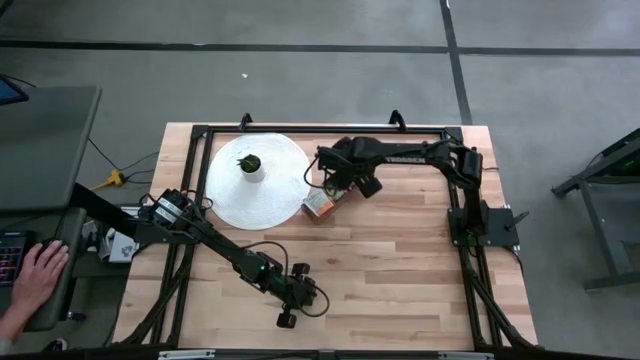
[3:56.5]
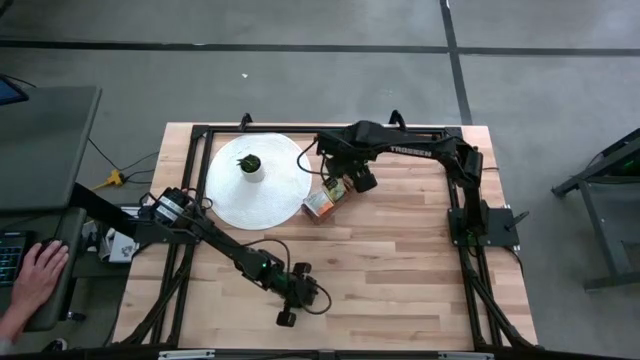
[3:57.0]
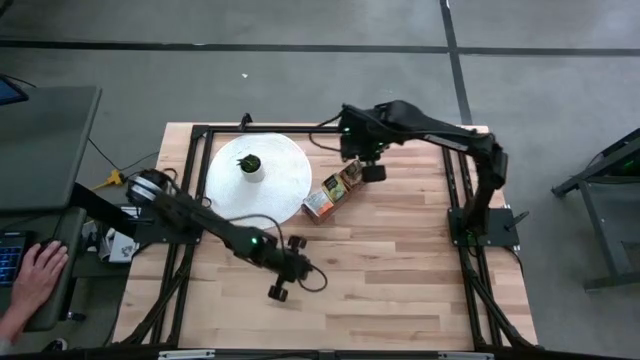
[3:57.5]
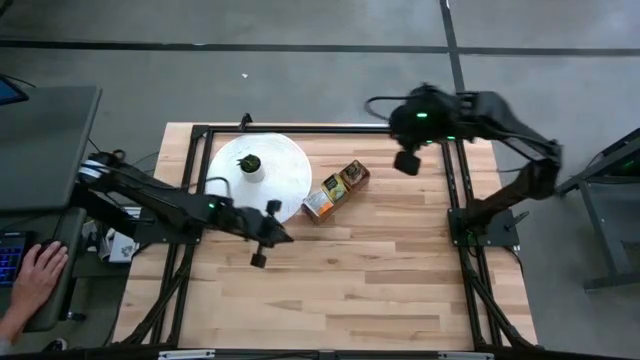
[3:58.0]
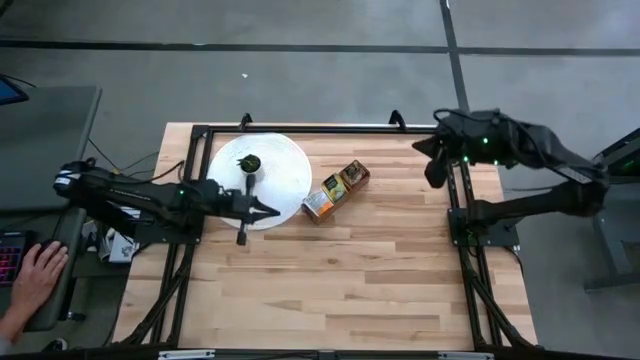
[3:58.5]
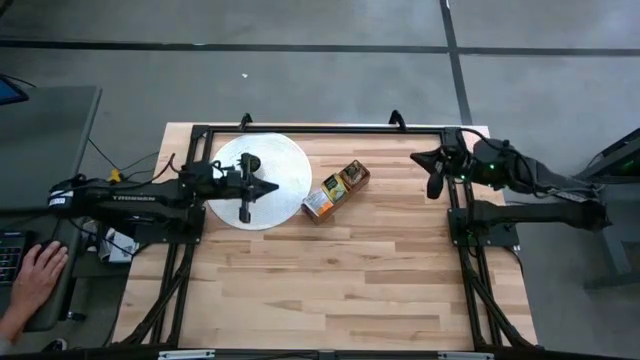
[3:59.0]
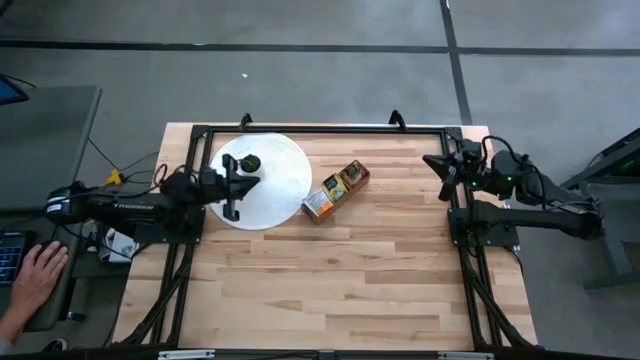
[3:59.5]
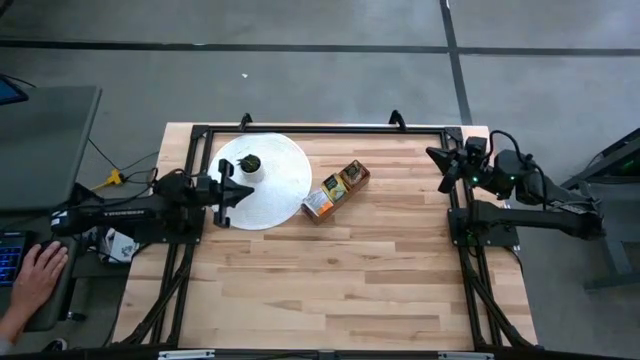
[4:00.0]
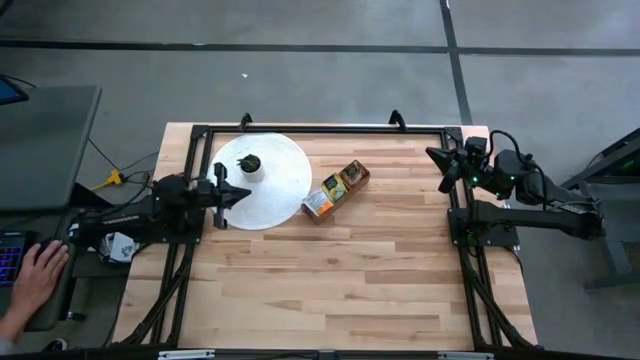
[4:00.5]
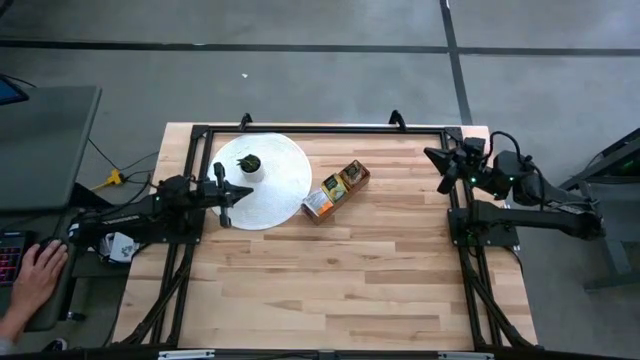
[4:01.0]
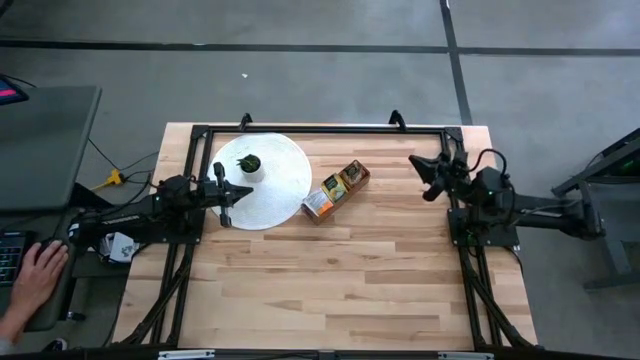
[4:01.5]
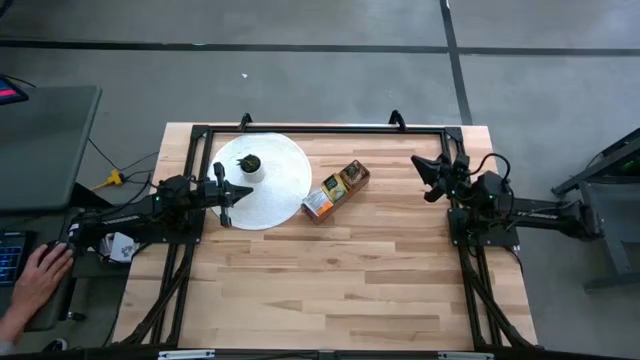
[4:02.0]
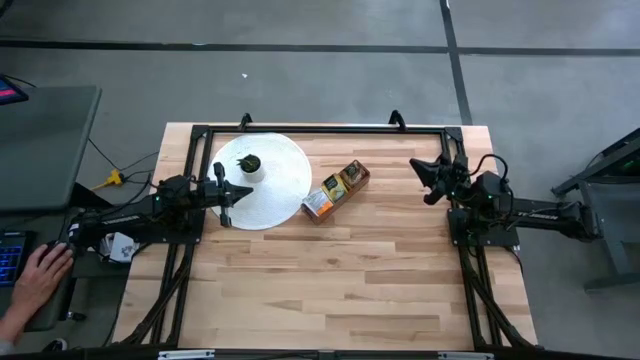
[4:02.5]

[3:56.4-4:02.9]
Task: Pick & Place Tea
Return to Home Position

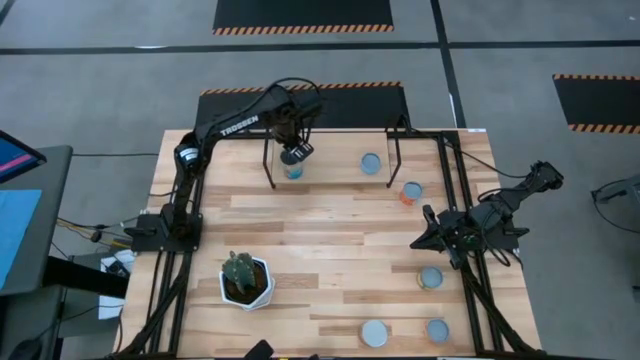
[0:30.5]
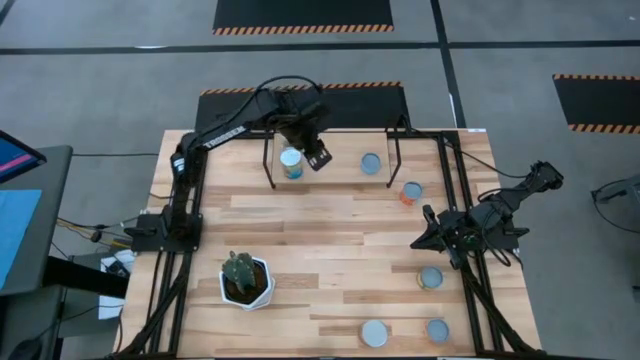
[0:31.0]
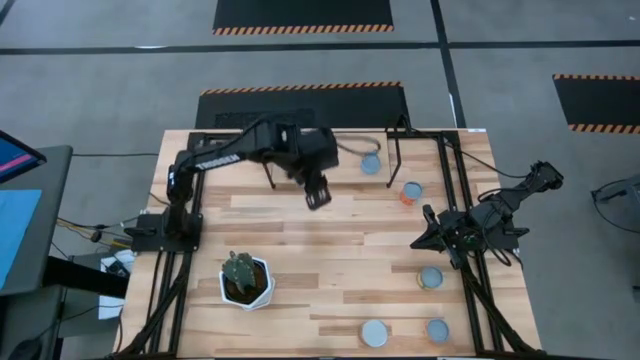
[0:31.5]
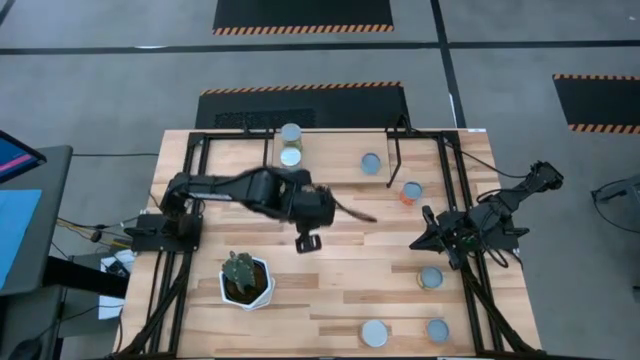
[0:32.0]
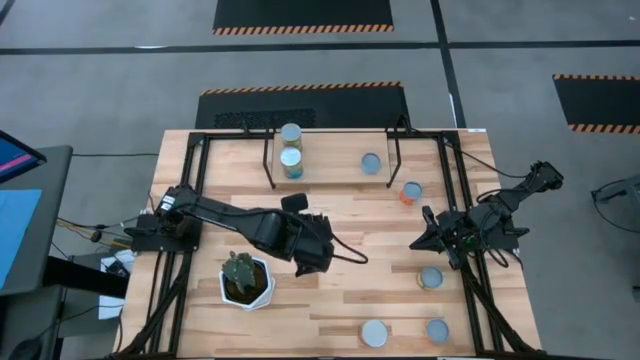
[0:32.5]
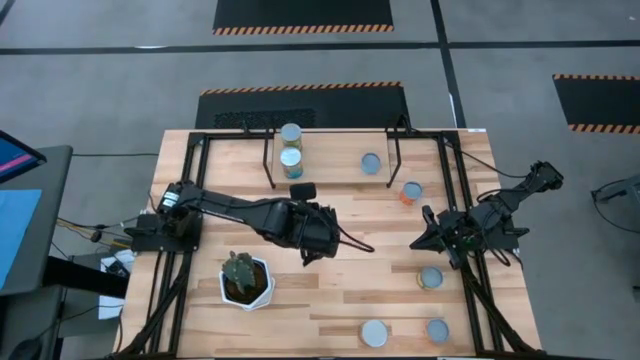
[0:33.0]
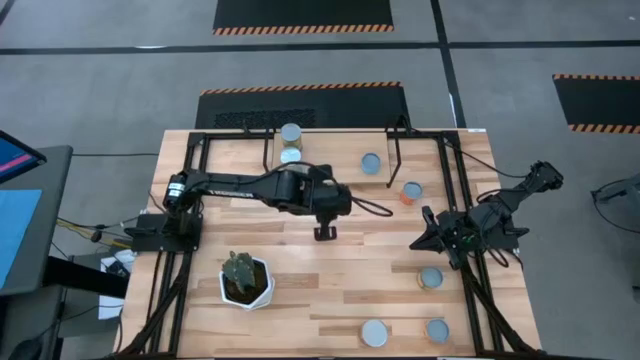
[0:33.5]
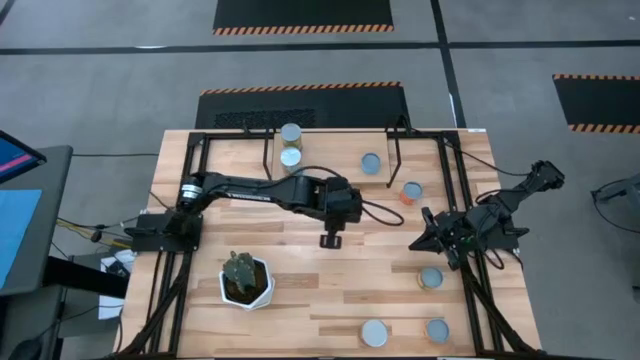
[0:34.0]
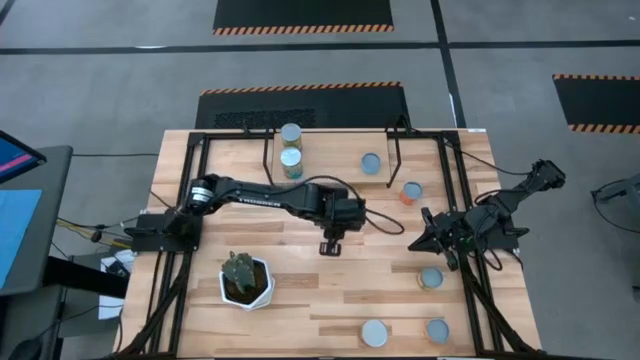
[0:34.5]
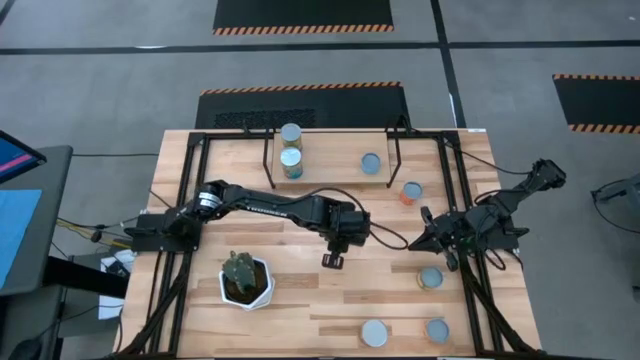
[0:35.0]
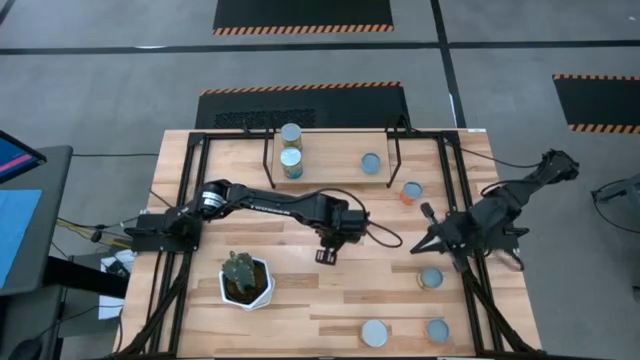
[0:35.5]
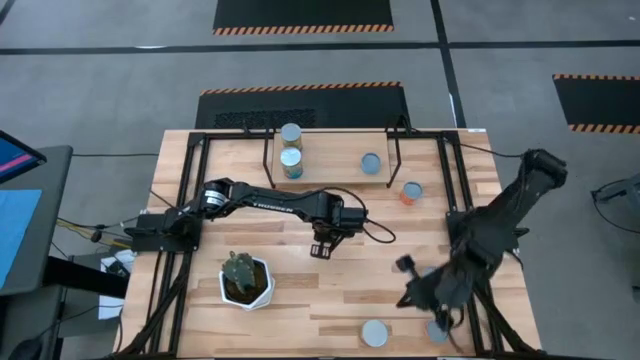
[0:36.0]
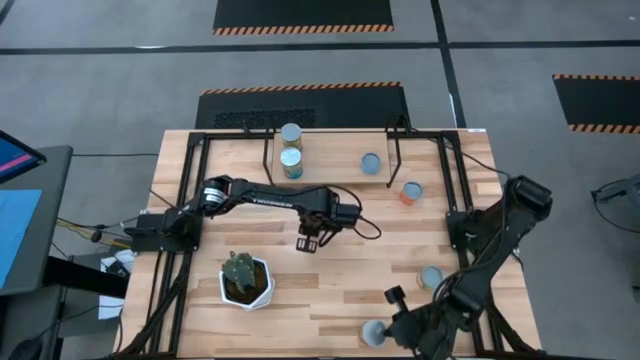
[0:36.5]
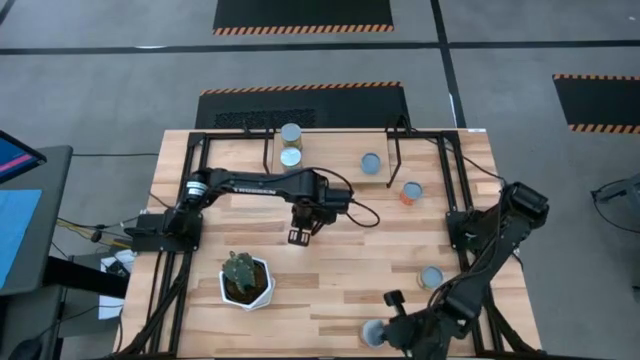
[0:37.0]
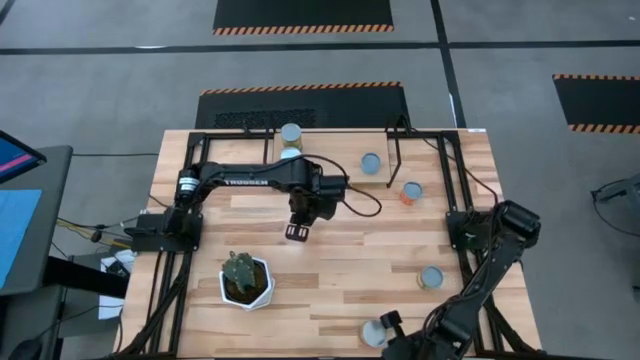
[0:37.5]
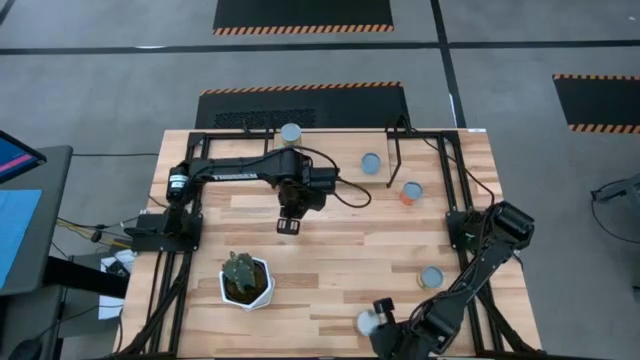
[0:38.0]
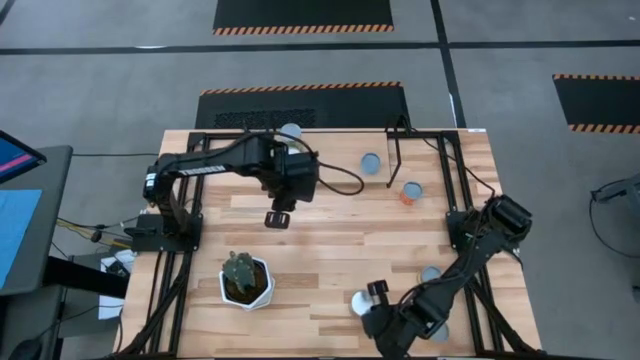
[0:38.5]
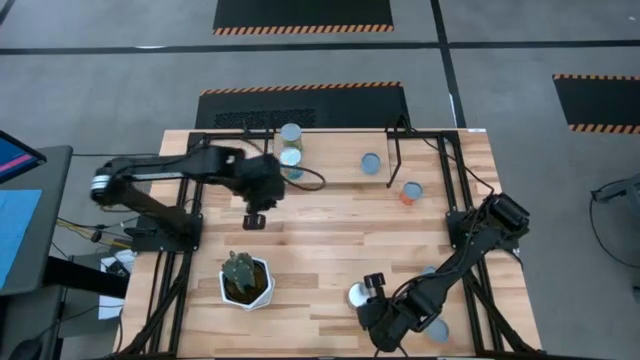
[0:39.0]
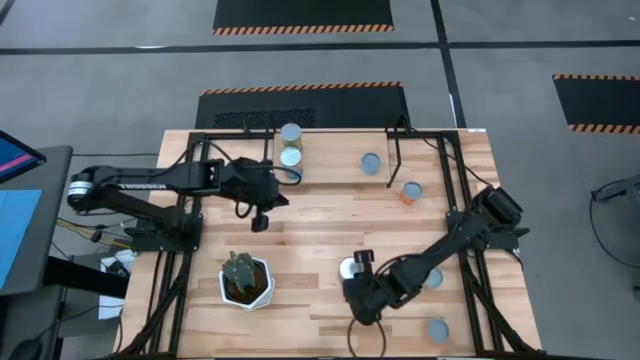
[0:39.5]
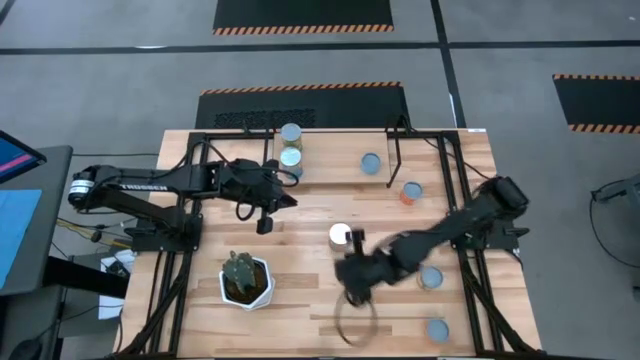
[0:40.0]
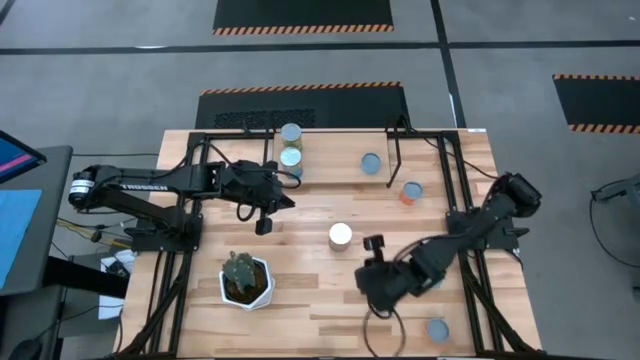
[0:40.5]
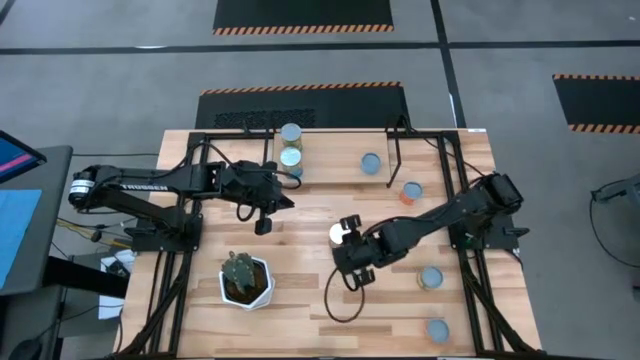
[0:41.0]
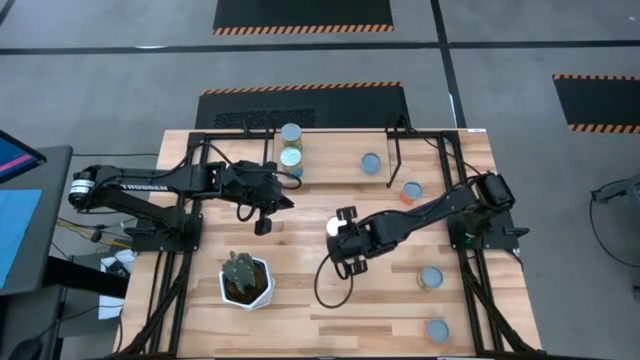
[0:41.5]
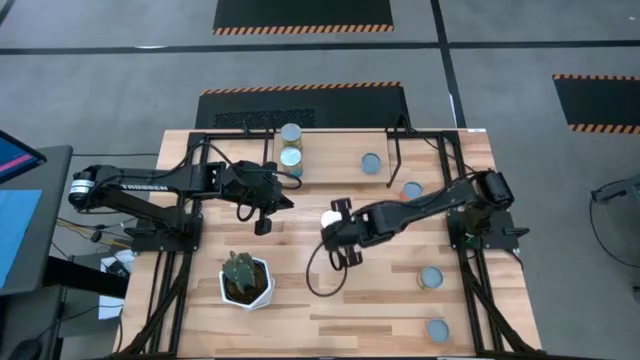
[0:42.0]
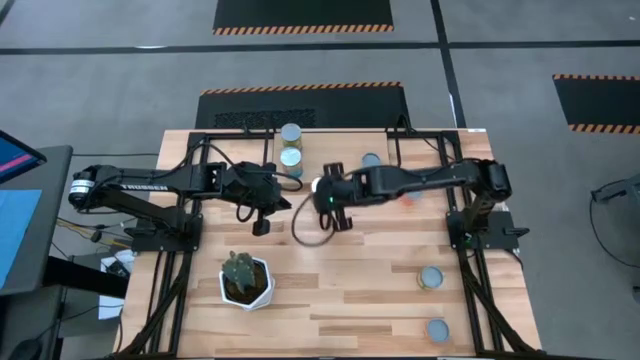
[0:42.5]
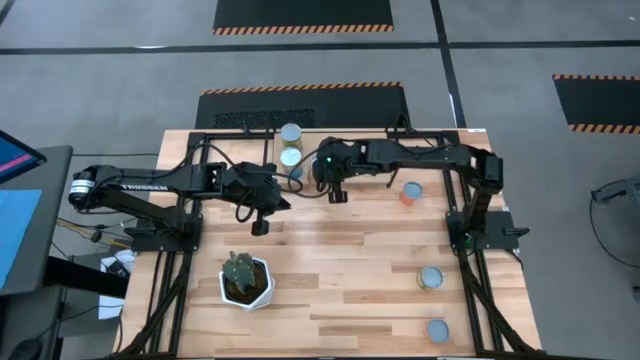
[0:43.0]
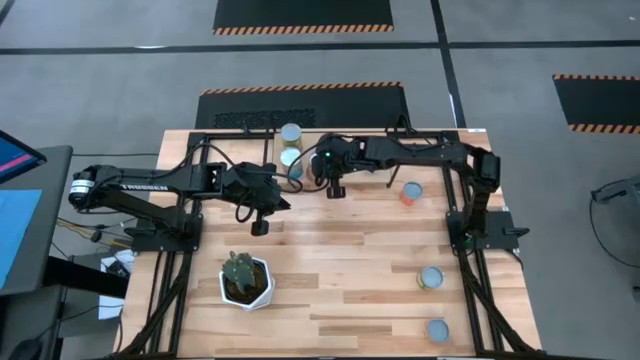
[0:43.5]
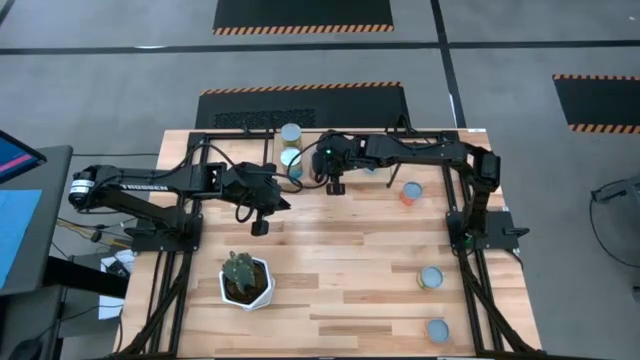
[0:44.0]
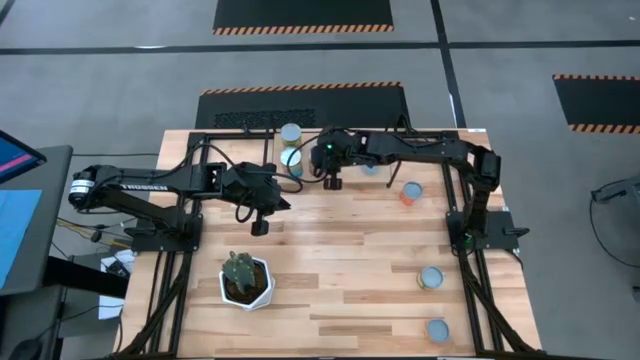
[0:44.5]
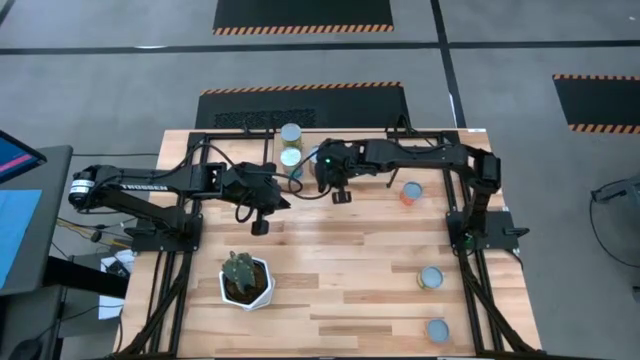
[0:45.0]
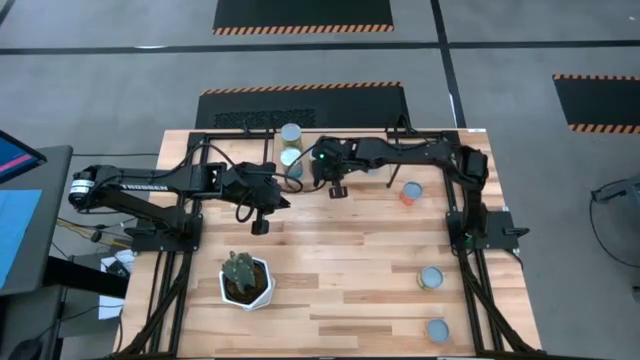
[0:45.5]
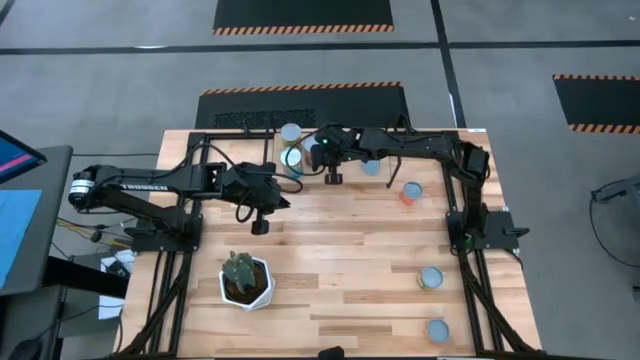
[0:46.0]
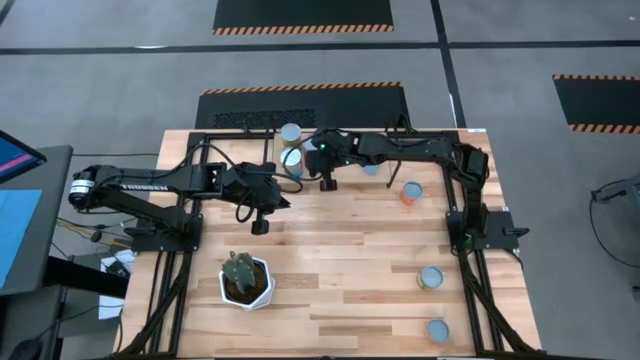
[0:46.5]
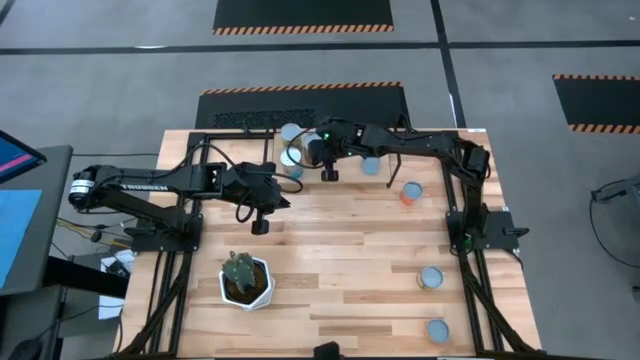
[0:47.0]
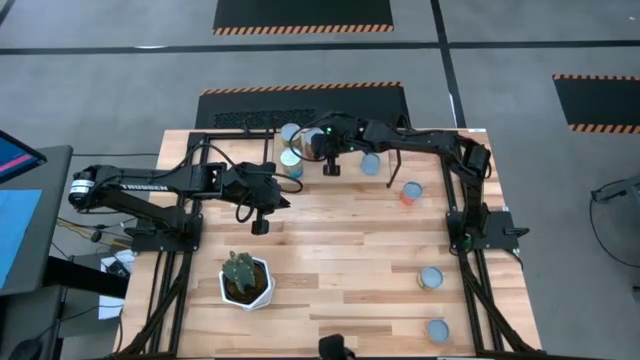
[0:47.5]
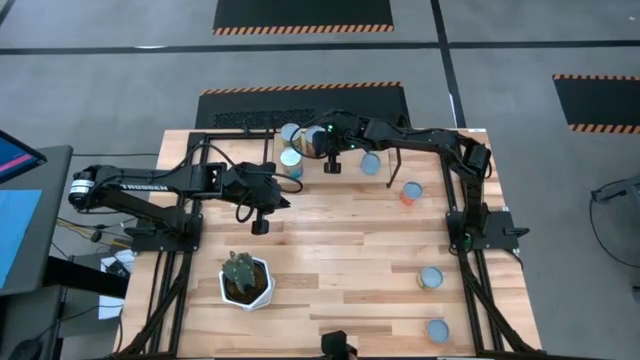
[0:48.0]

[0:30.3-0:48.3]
Task: Pick and place cans onto a shelf
Put the canned green beans on the shelf
